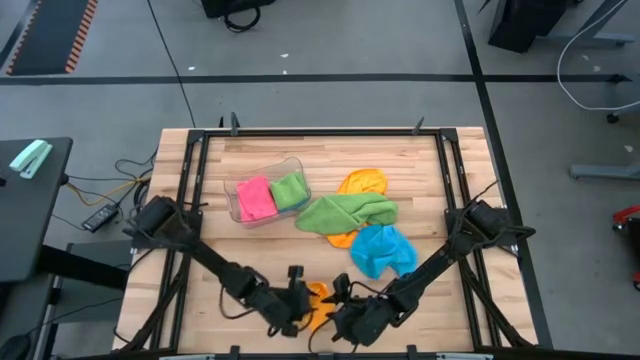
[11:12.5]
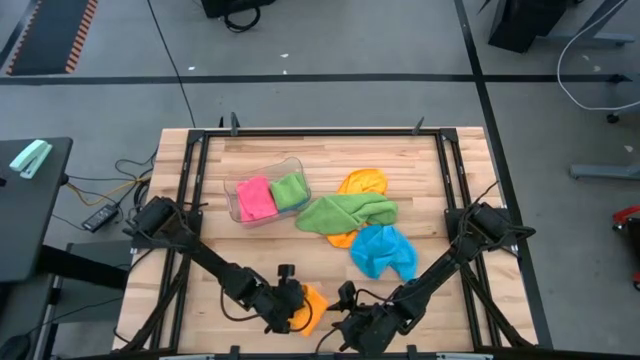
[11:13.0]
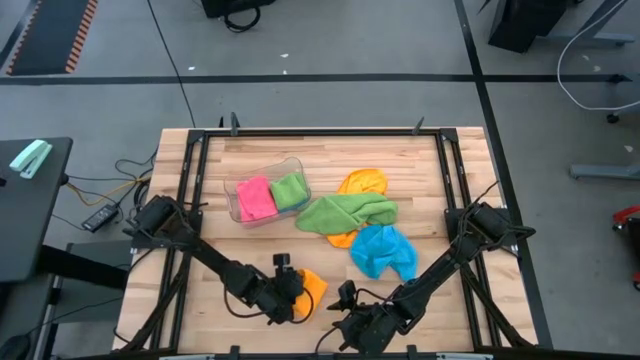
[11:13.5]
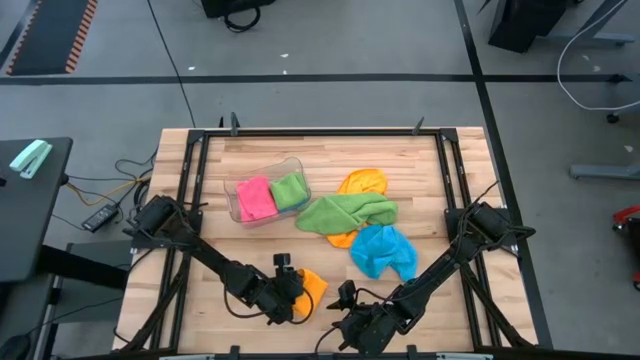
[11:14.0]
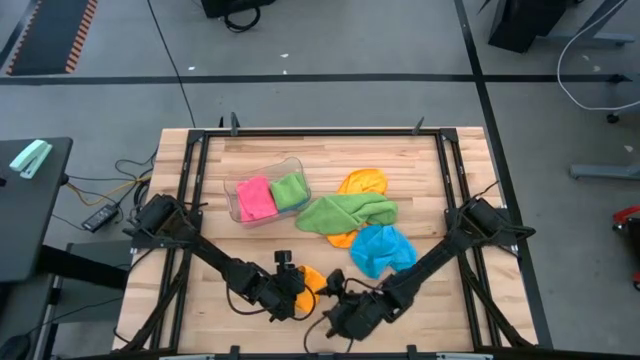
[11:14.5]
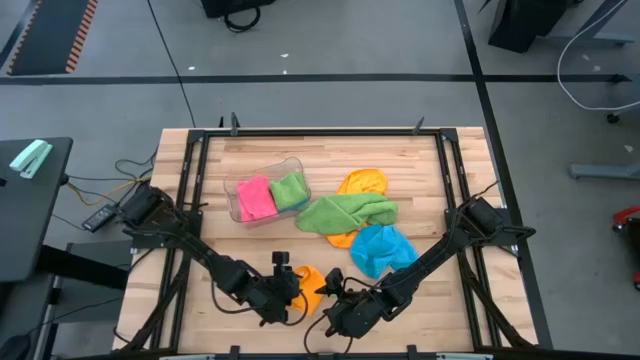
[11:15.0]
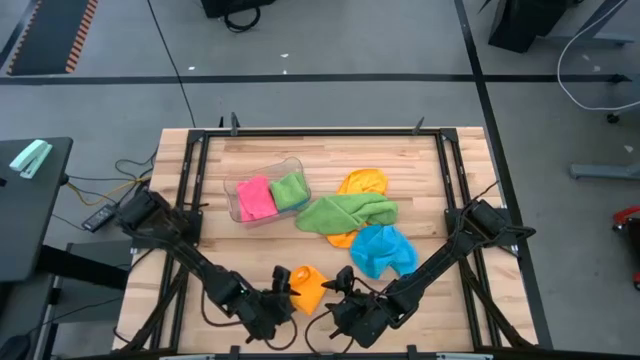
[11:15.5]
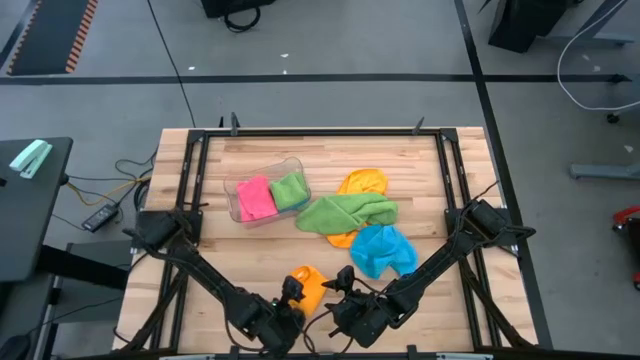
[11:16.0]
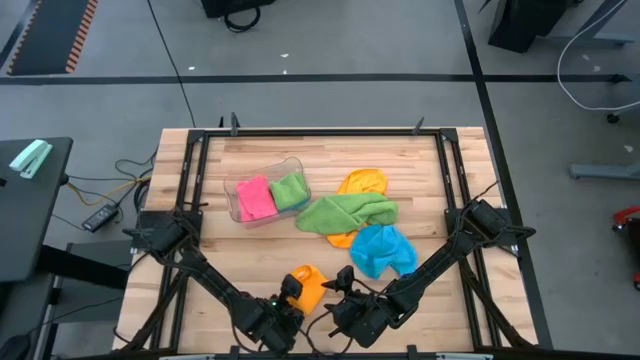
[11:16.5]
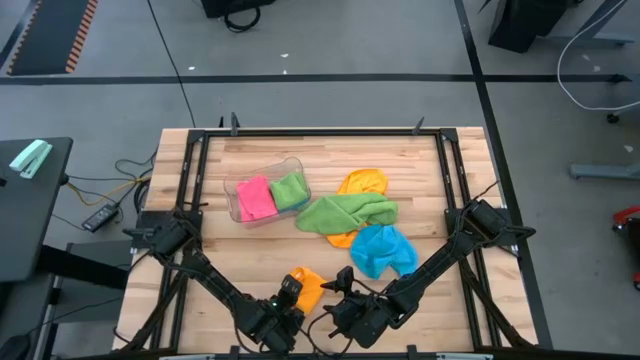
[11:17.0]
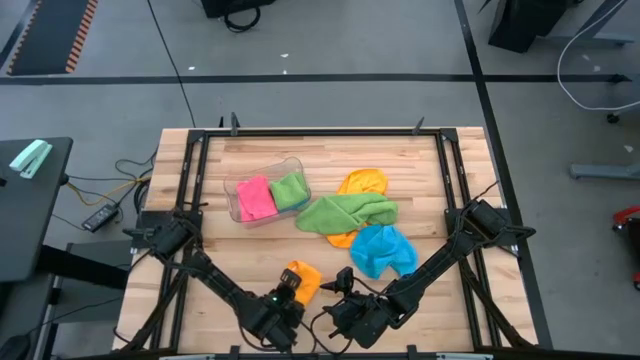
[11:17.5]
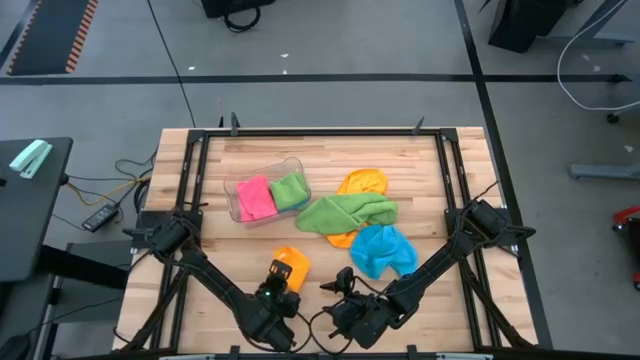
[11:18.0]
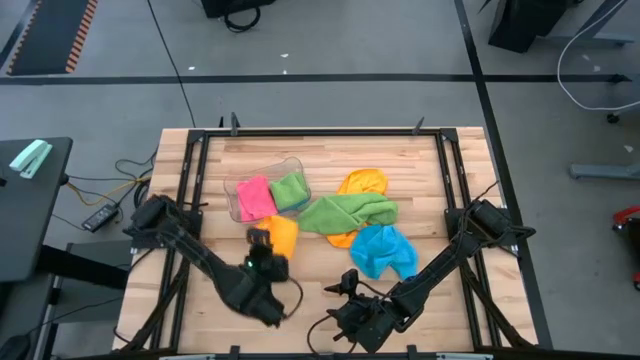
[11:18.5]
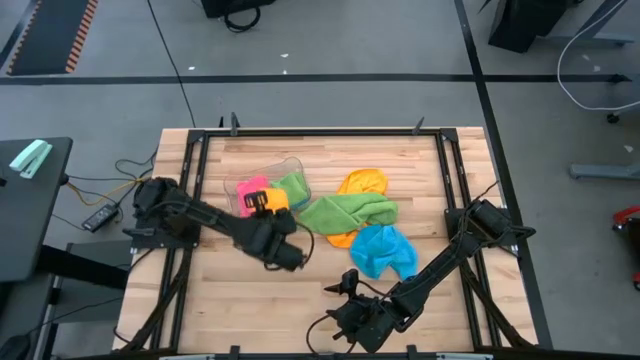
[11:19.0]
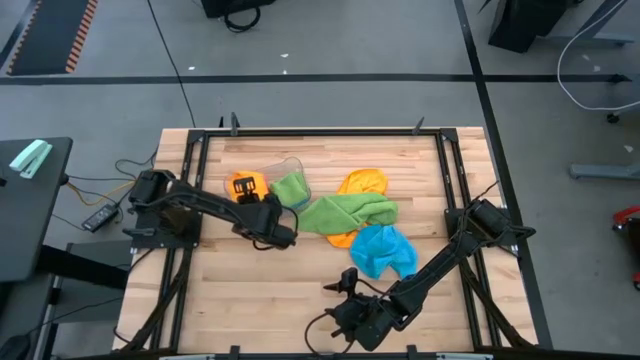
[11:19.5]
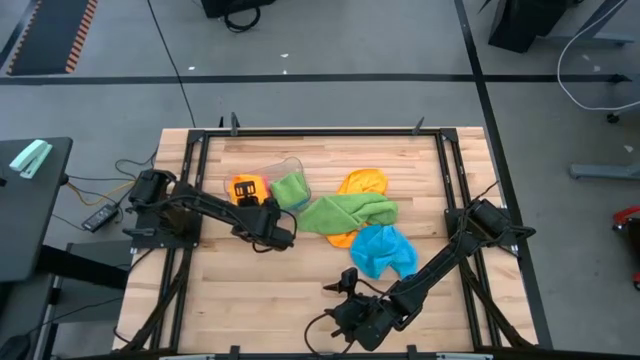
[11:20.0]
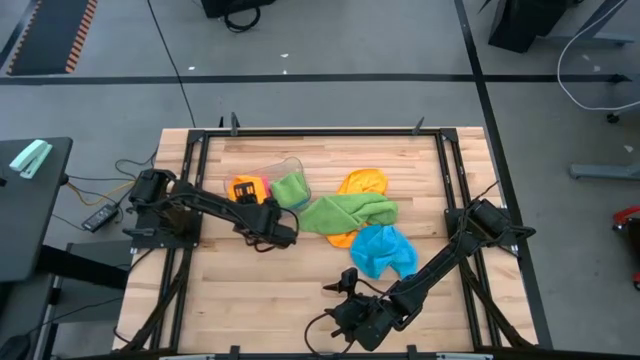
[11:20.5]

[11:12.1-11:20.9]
Task: Fold microfiber towels
Put the bottom yellow microfiber towel into the transparent bin

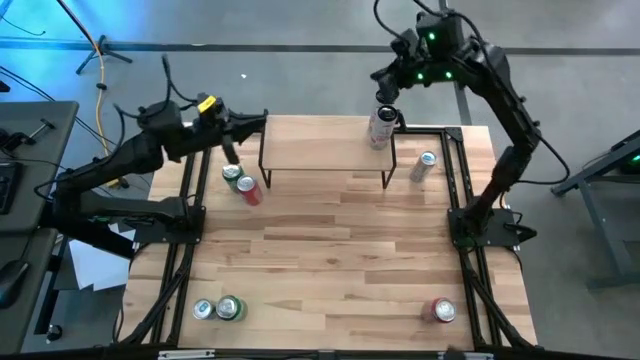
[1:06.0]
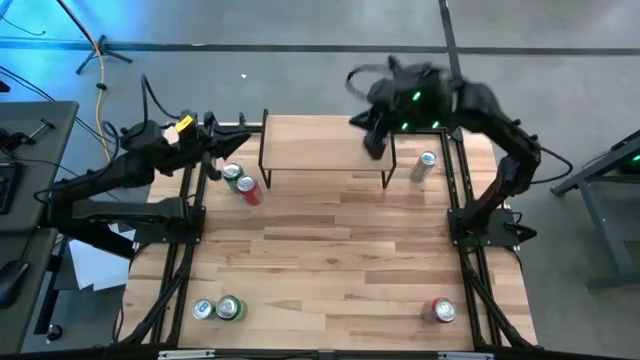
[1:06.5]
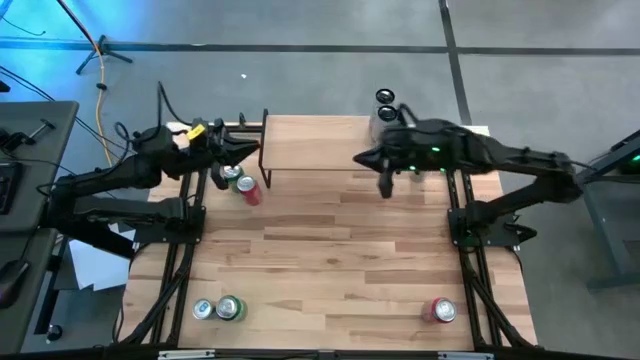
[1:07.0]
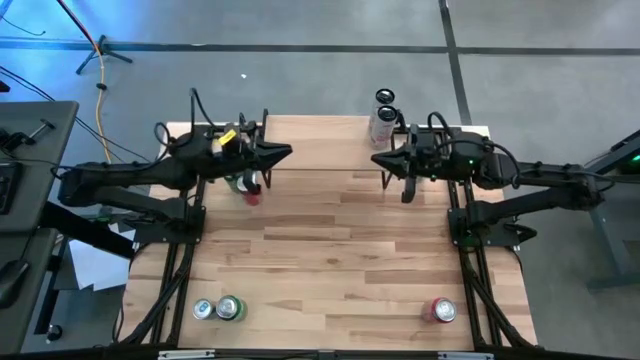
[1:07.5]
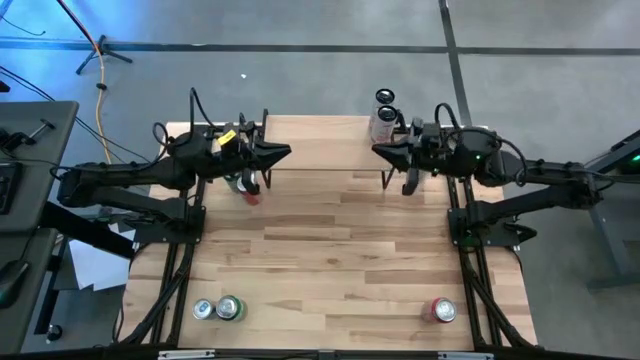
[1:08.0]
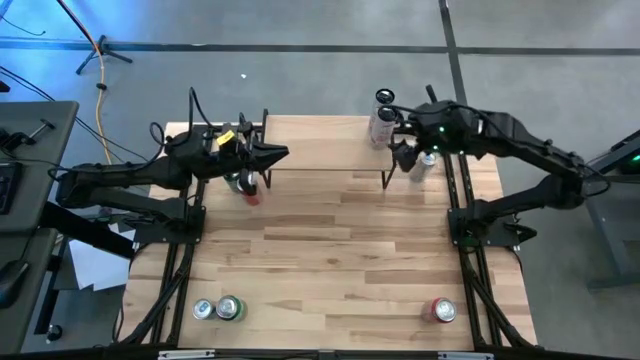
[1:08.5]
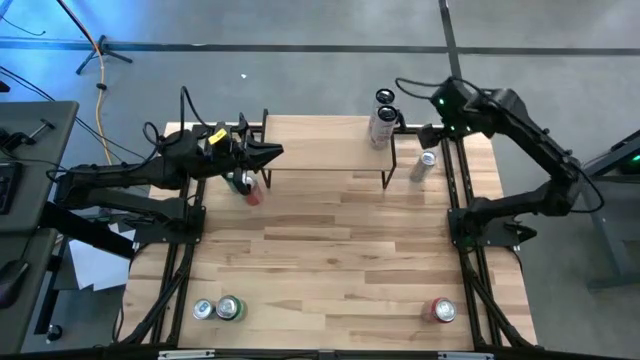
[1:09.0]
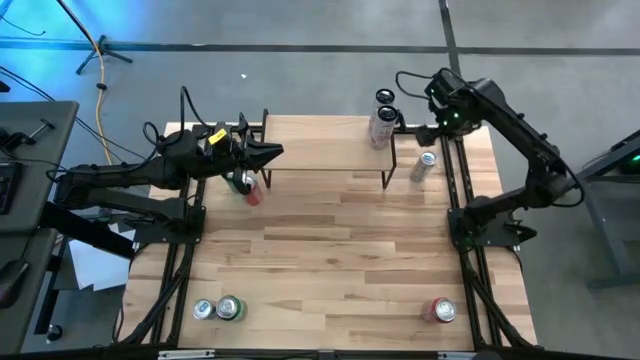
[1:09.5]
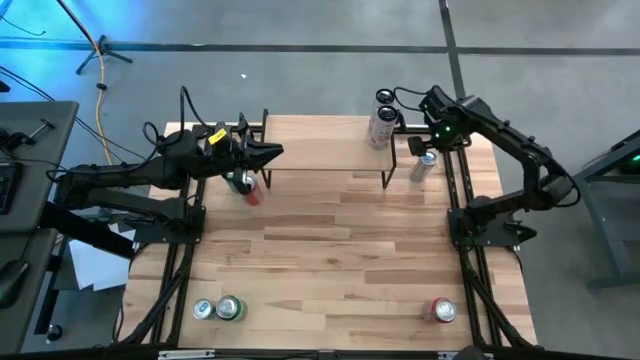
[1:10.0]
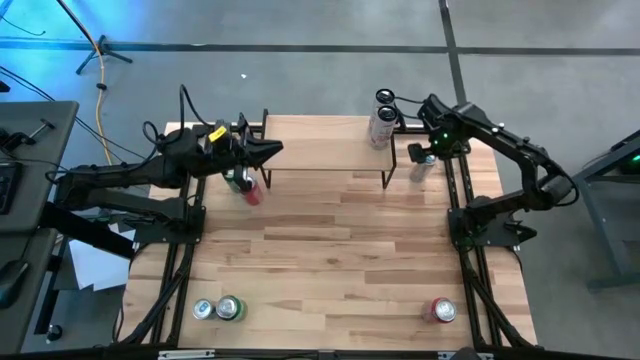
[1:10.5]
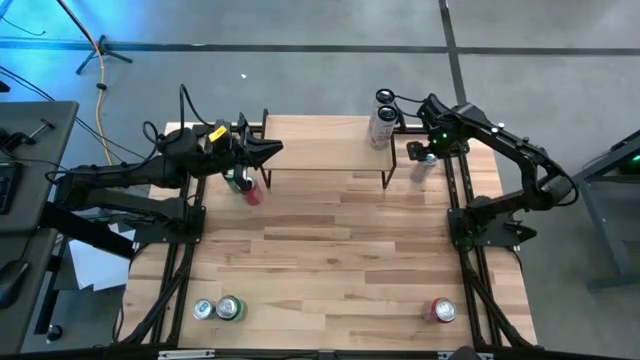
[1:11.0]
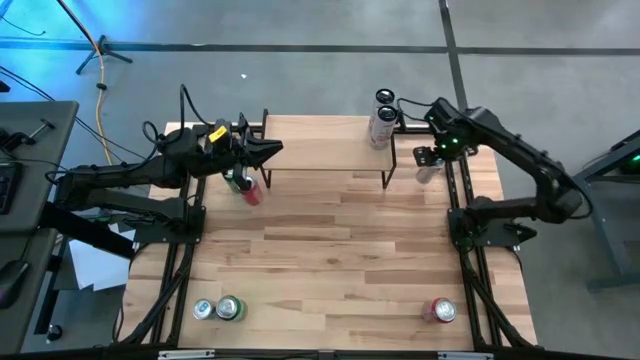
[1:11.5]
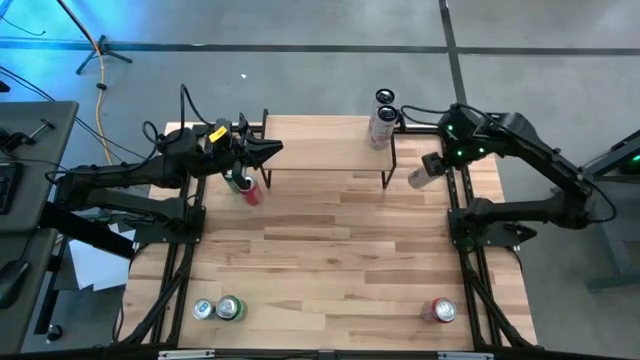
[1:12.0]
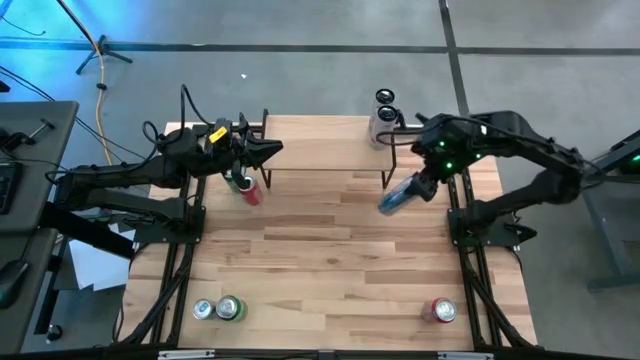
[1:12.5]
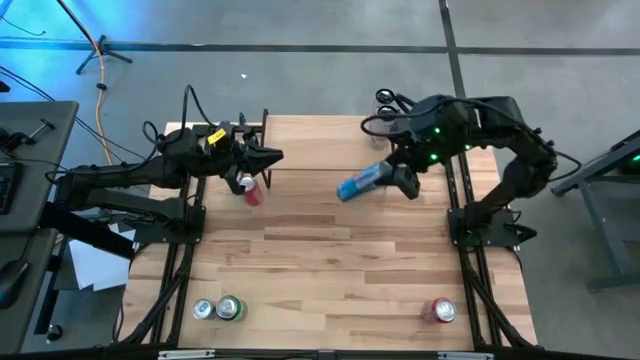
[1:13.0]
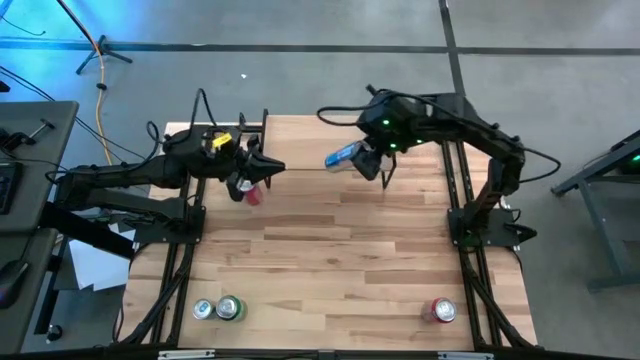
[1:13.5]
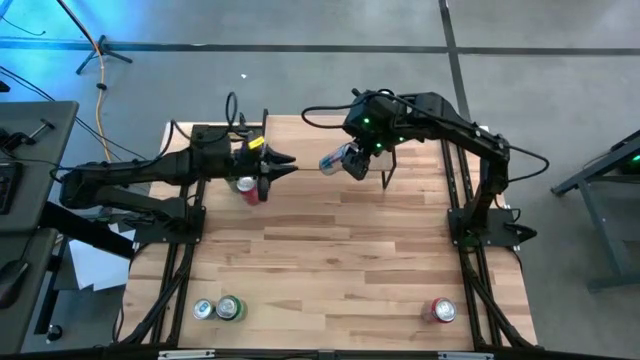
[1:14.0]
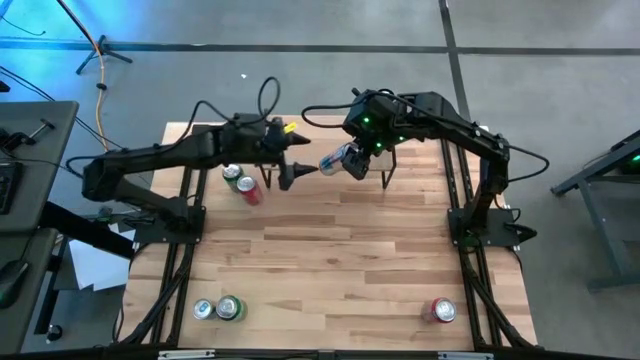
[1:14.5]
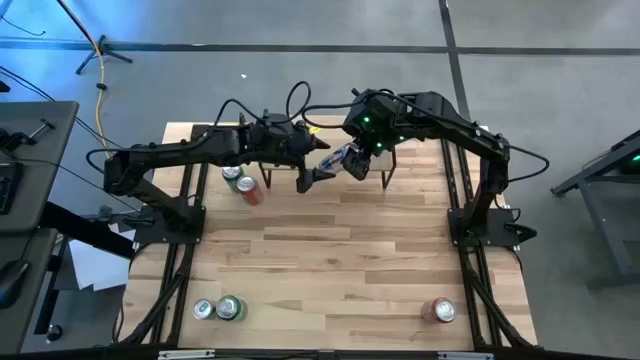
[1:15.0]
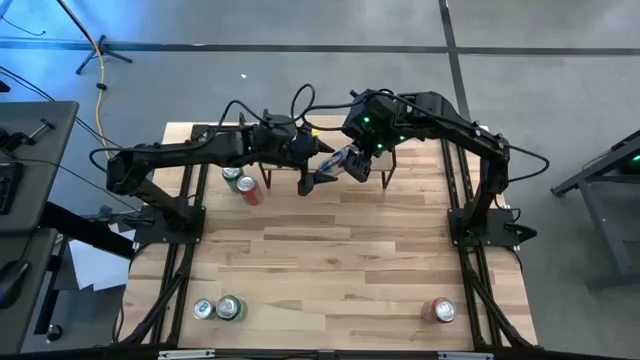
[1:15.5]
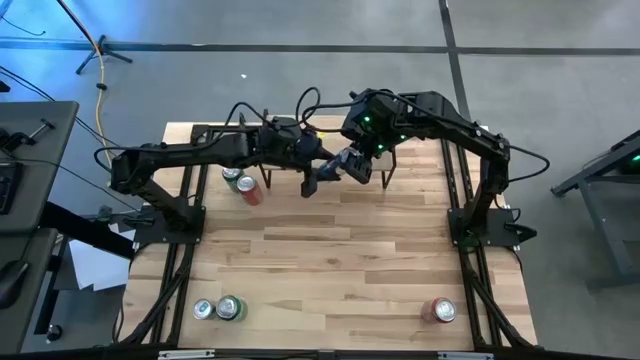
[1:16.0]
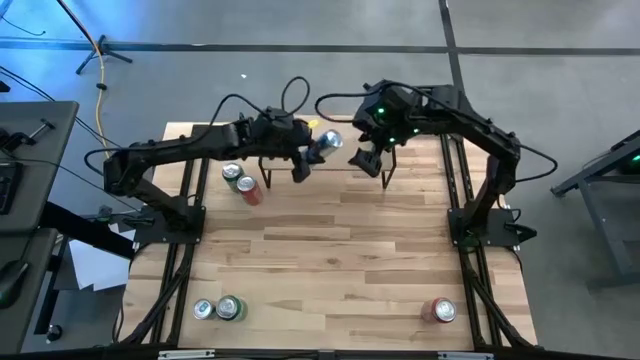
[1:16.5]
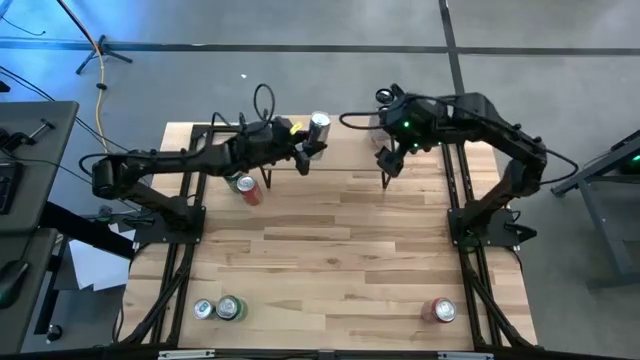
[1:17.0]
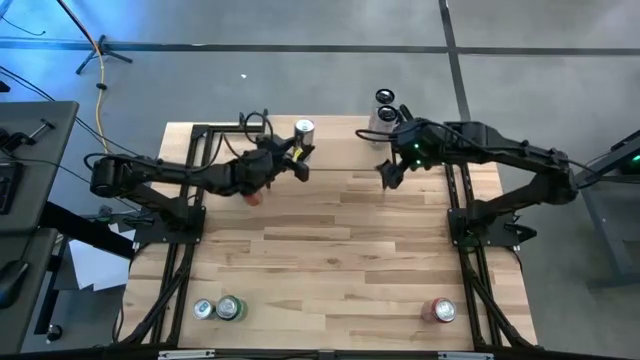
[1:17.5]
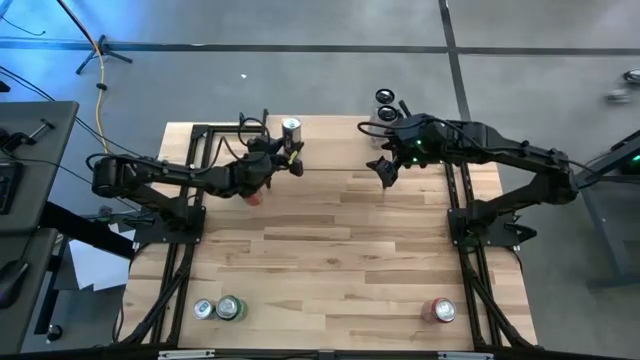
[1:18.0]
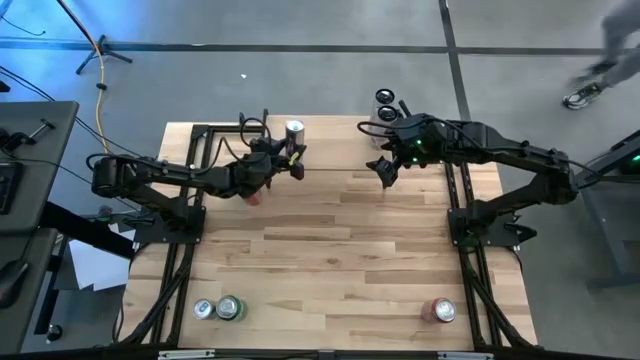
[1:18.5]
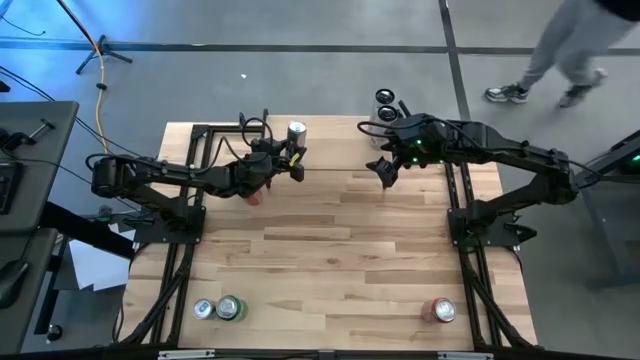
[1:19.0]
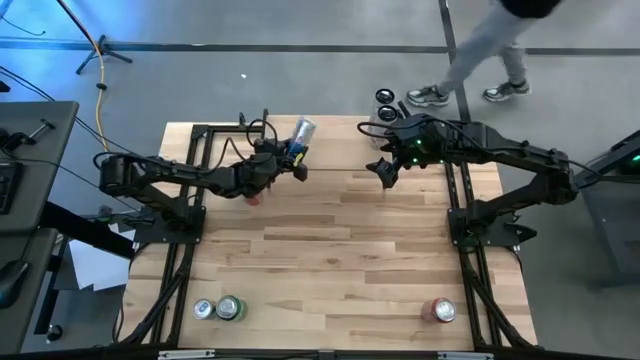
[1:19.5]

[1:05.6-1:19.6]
Task: Place canned beverage on shelf
Put the top blue soda can on the shelf
